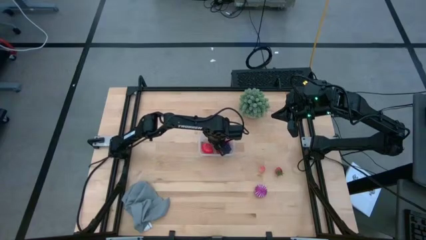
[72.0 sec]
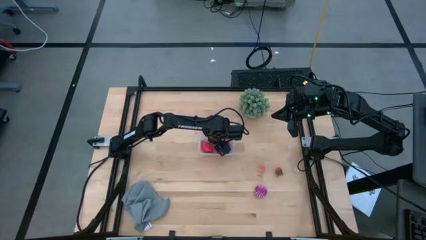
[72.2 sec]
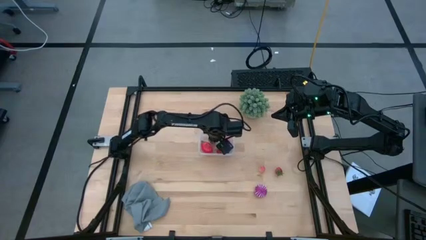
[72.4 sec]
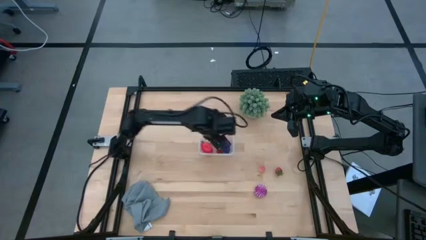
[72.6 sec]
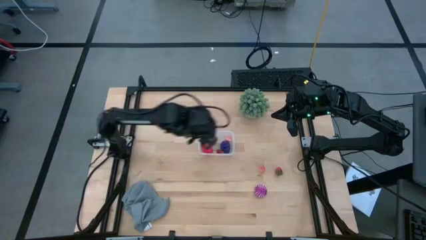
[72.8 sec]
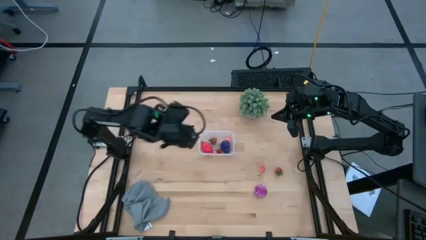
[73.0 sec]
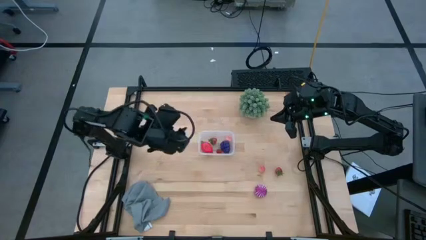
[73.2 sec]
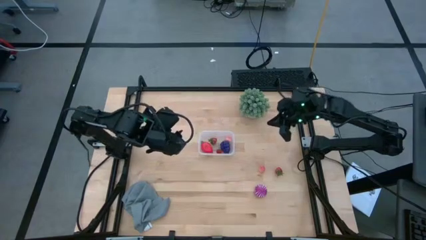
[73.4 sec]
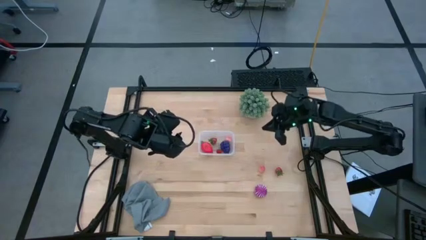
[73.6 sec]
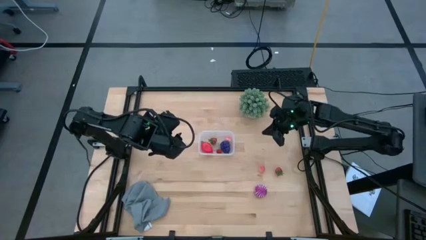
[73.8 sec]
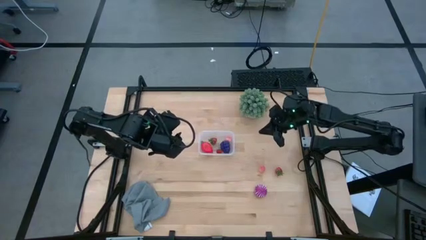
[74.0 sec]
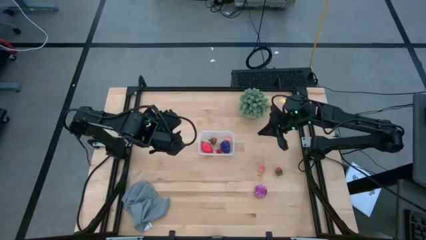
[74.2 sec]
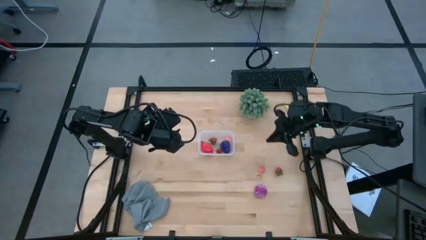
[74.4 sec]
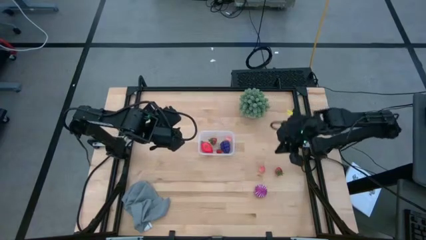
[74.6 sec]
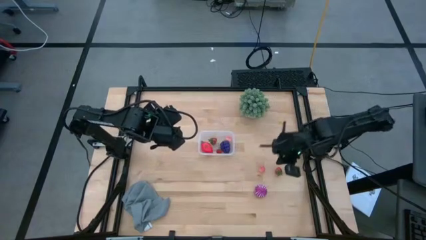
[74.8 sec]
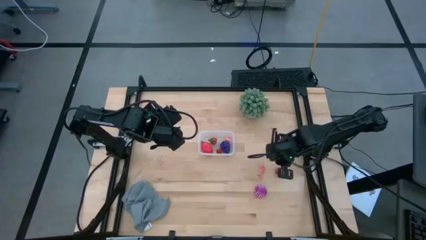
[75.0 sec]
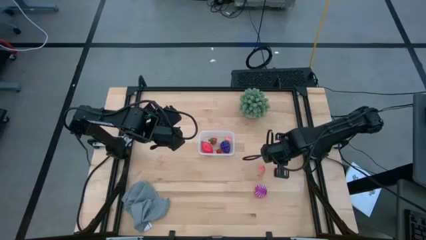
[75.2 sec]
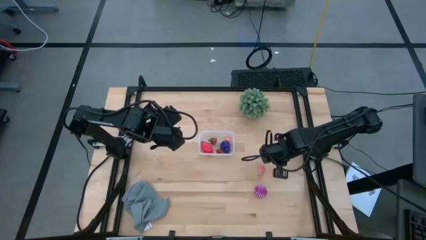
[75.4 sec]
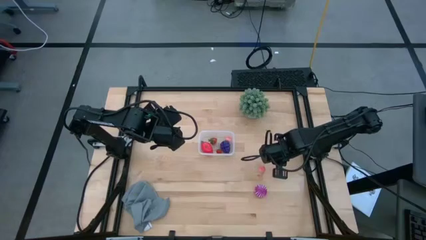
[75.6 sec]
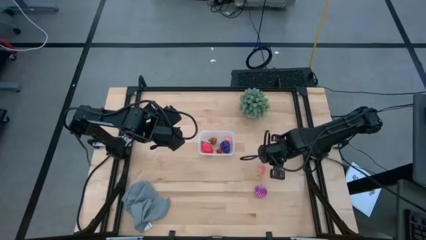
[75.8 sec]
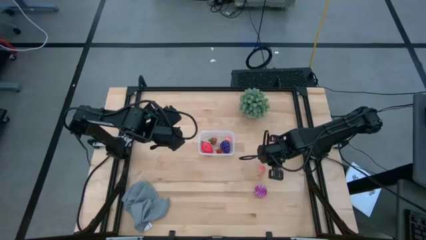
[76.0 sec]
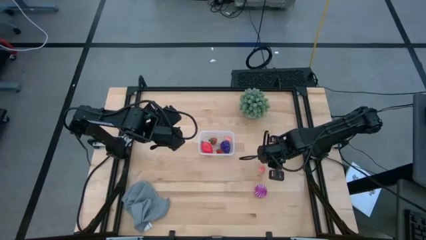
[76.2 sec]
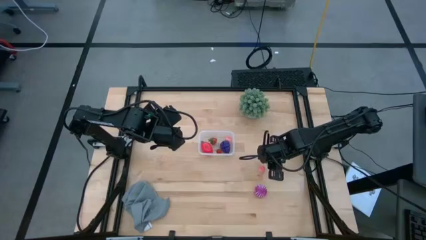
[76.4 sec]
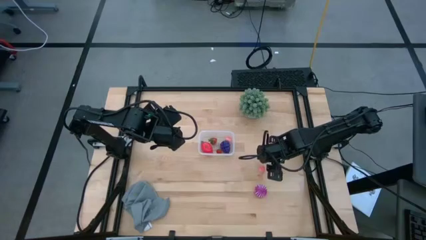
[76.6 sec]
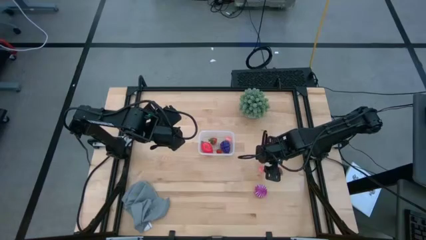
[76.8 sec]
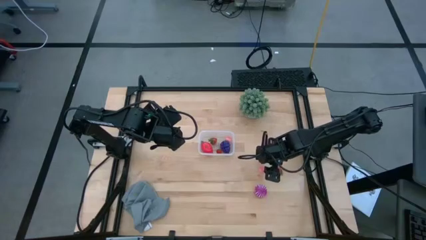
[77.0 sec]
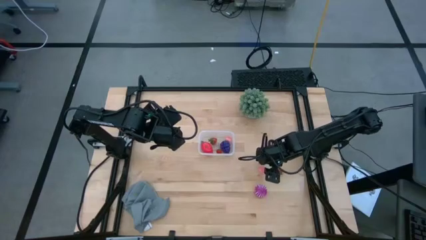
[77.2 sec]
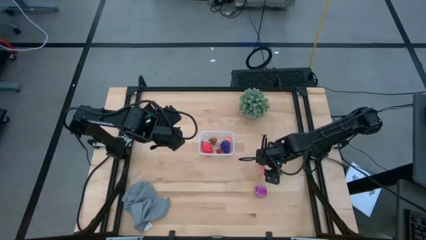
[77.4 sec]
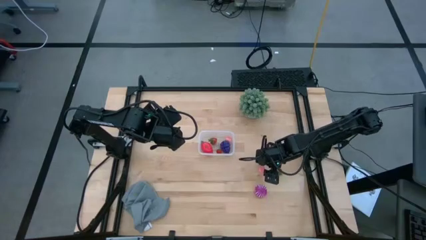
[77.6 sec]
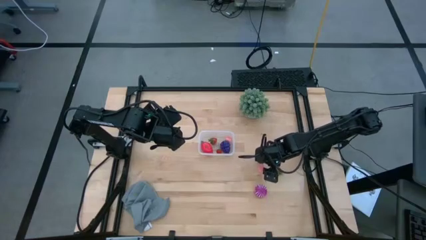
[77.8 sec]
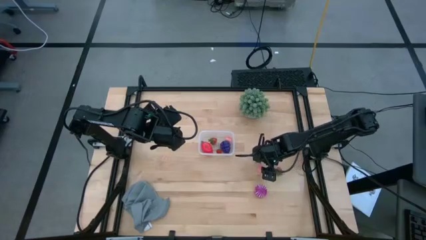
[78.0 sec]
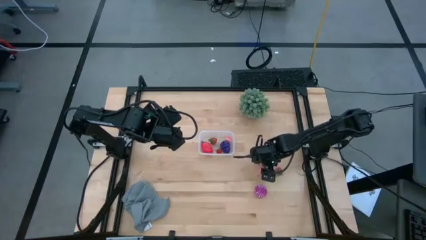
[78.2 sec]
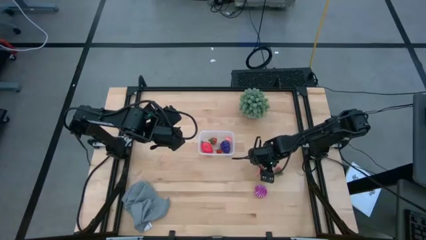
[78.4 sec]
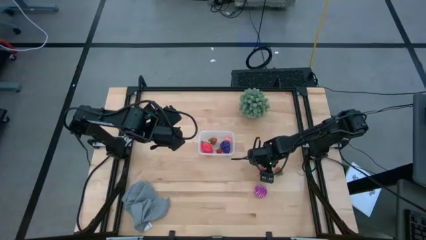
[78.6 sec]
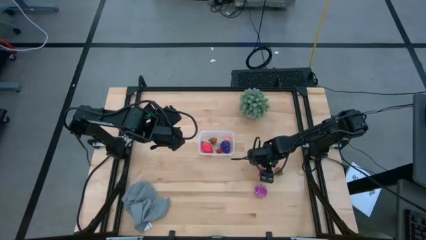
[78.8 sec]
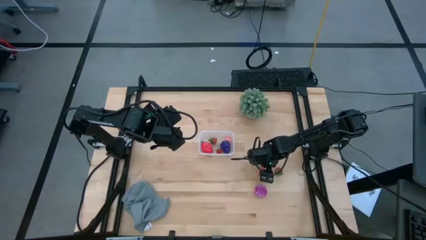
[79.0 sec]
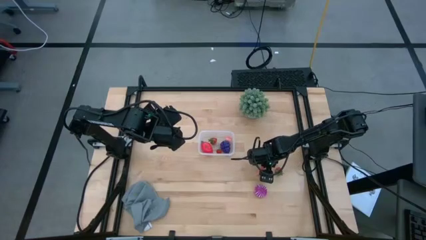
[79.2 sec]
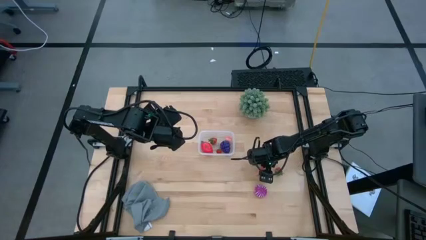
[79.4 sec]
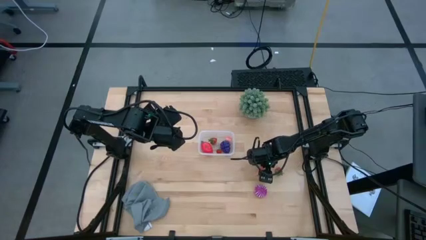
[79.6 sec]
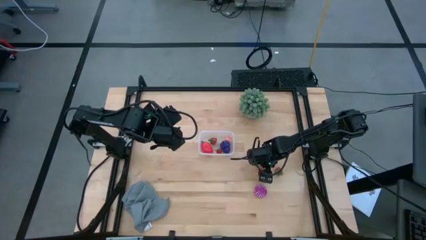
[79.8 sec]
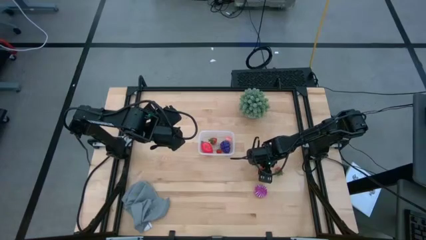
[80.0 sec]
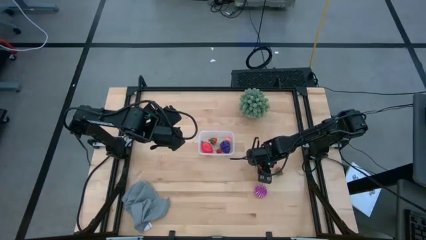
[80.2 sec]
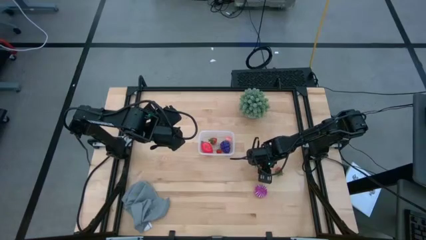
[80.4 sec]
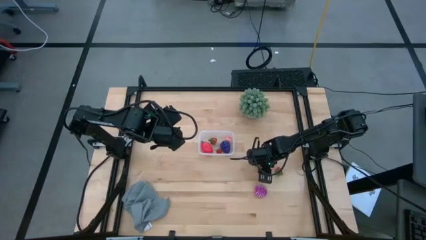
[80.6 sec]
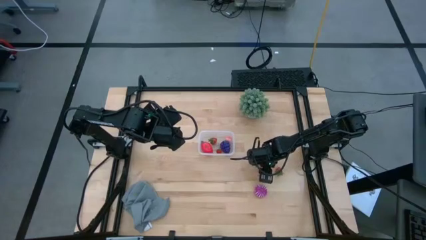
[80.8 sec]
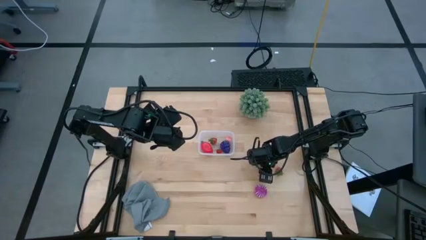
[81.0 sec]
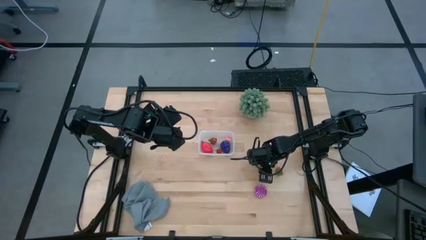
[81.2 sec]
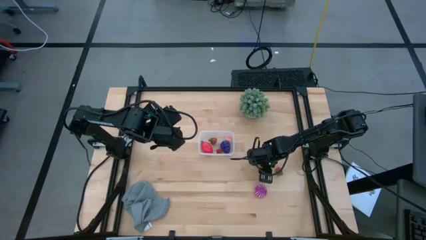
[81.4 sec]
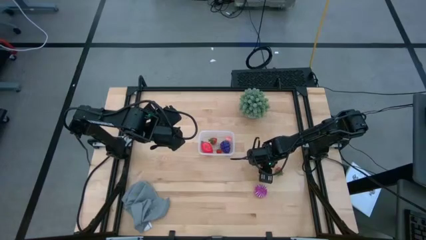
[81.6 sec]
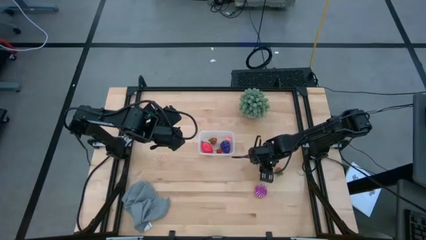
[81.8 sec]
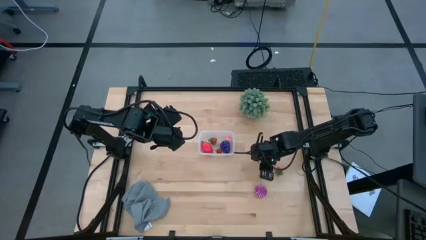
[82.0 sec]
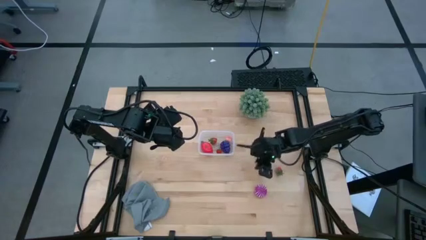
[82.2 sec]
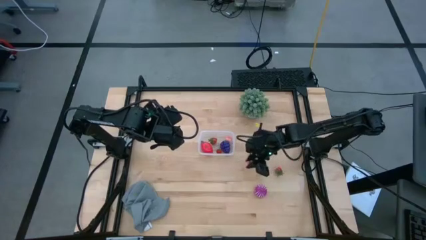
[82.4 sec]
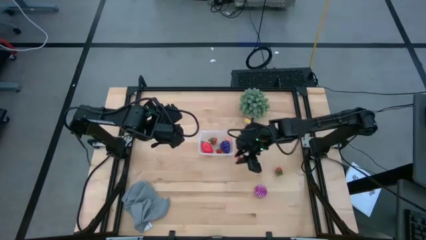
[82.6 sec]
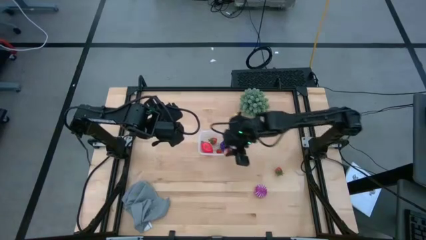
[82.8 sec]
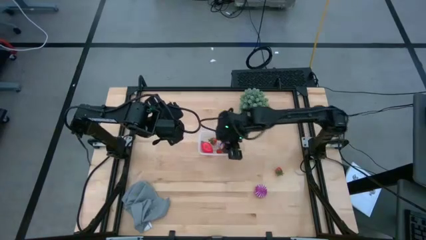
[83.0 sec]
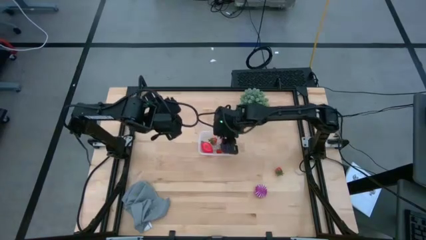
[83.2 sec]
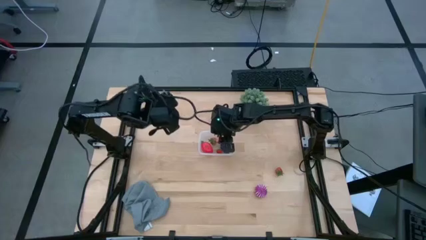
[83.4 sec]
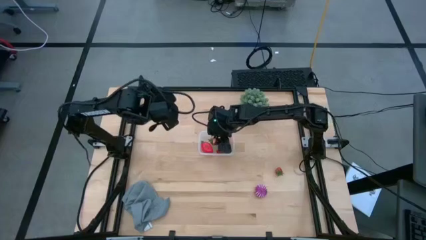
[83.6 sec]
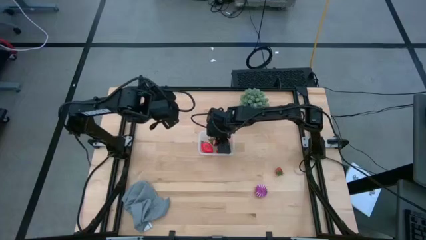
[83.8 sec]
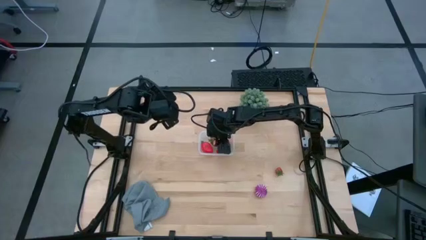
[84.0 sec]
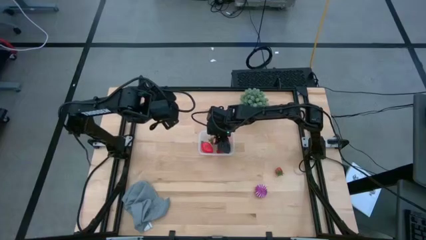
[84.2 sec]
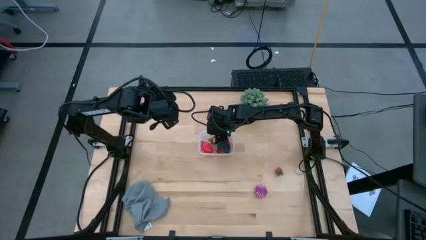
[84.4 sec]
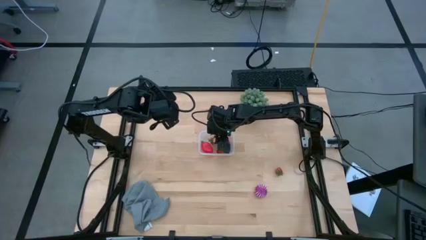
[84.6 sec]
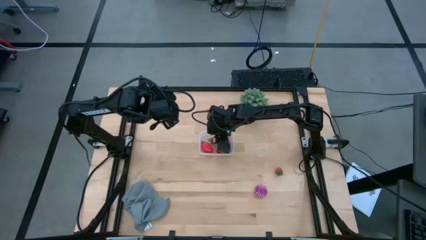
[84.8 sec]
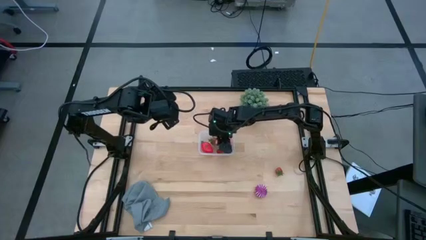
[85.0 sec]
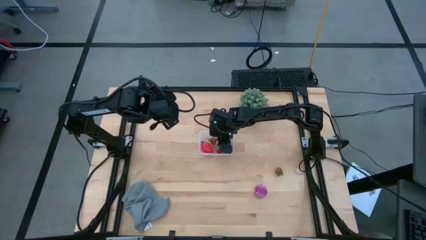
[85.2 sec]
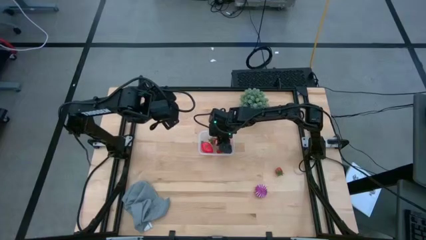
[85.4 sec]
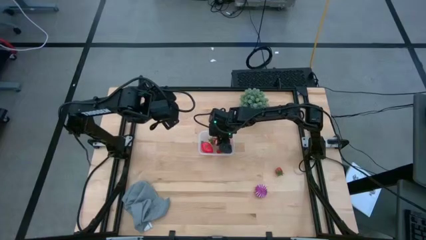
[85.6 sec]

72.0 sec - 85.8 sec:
Task: Pick and placing Produce into tupperware
Put the pink peach into the transparent bin
